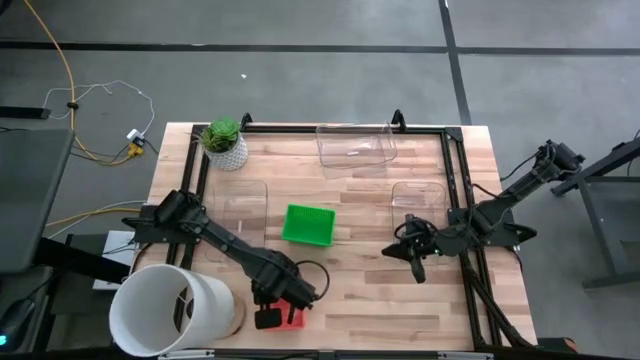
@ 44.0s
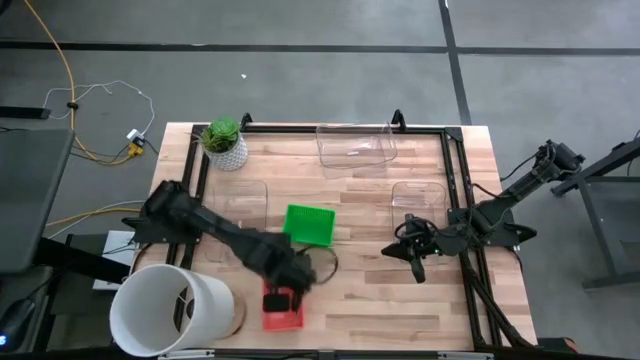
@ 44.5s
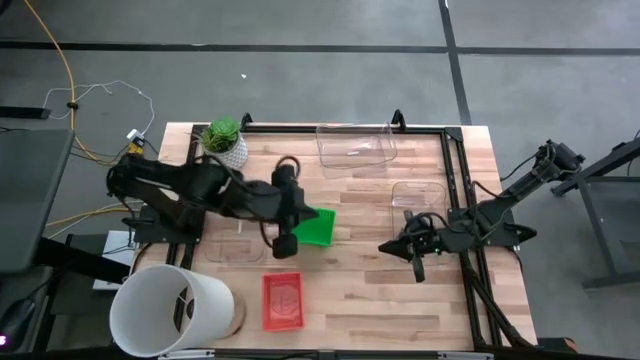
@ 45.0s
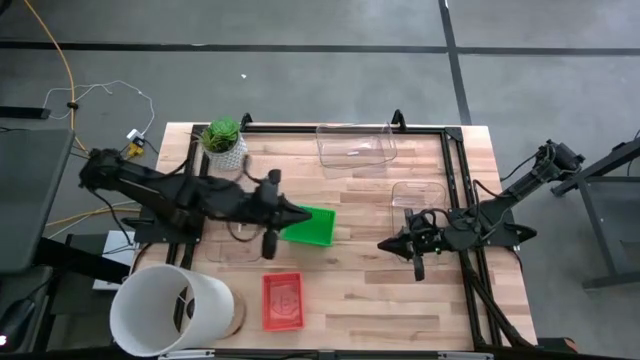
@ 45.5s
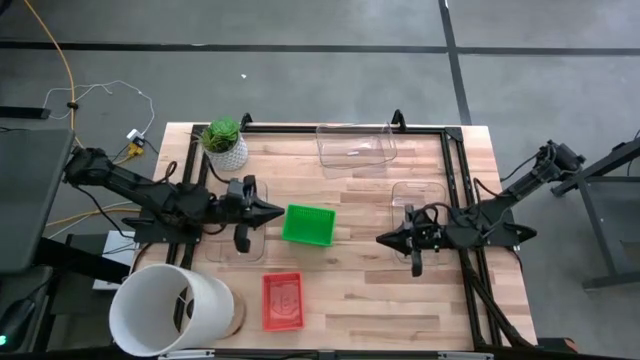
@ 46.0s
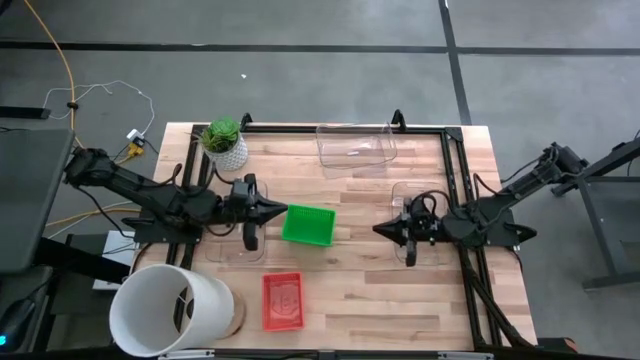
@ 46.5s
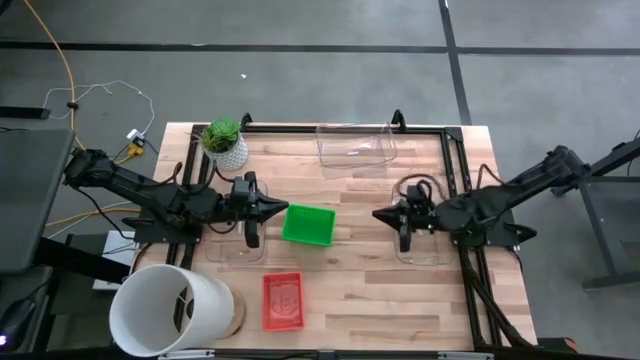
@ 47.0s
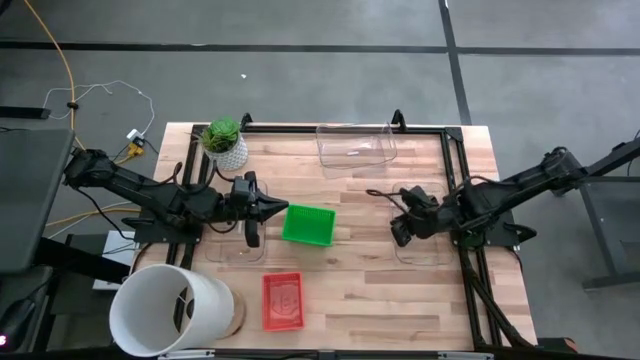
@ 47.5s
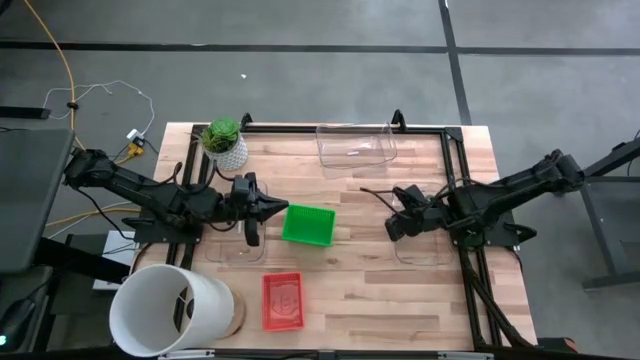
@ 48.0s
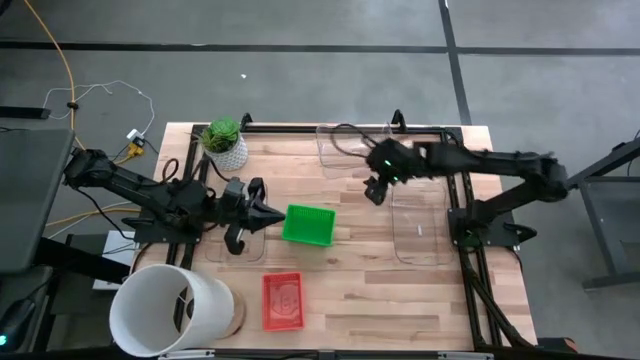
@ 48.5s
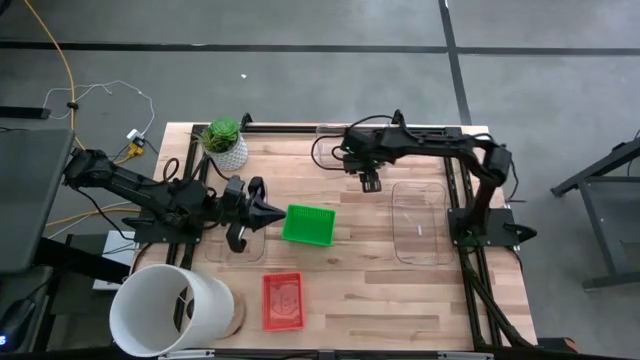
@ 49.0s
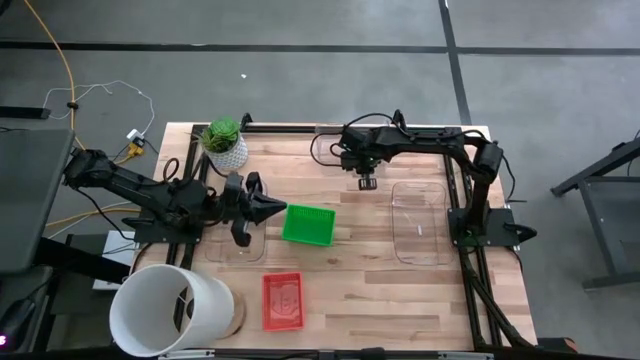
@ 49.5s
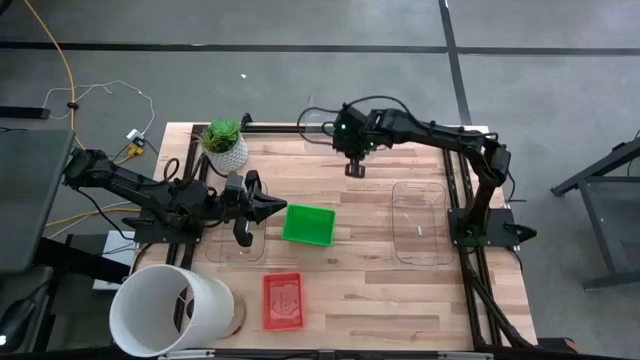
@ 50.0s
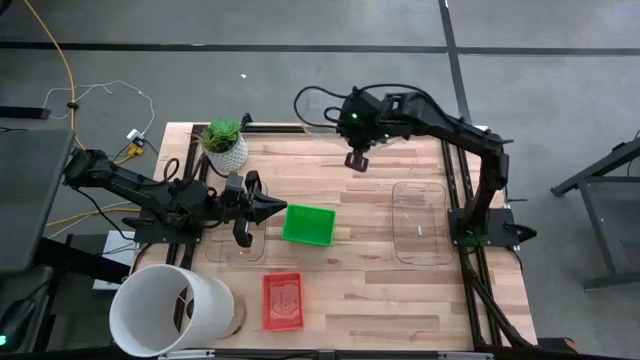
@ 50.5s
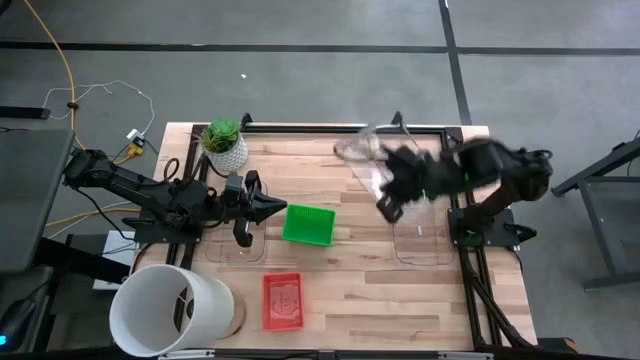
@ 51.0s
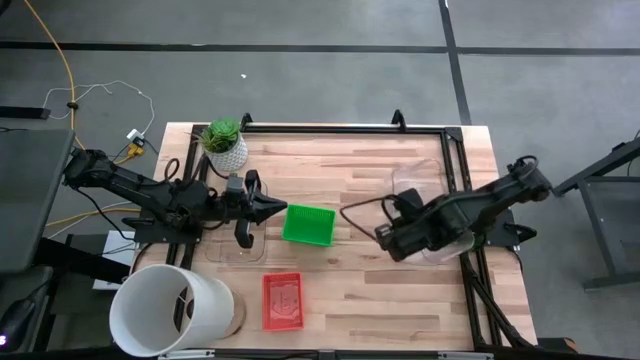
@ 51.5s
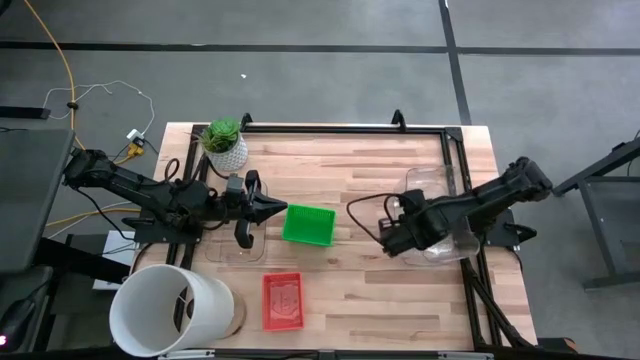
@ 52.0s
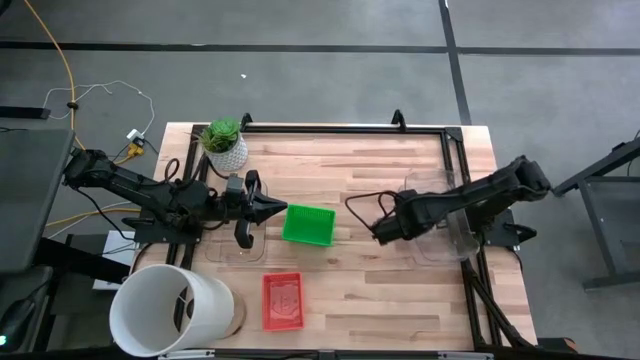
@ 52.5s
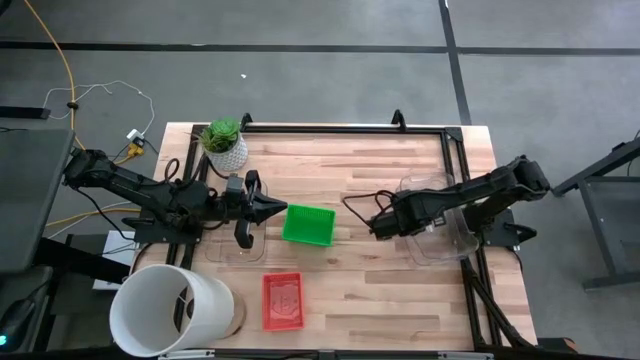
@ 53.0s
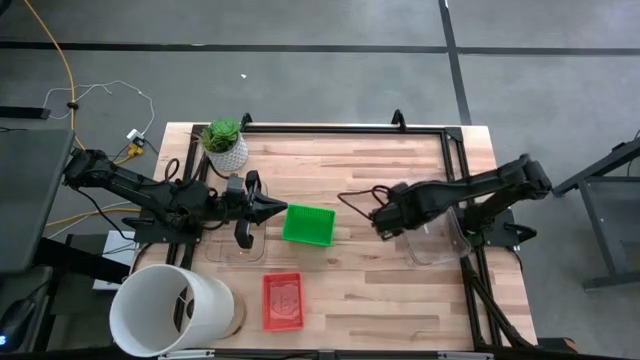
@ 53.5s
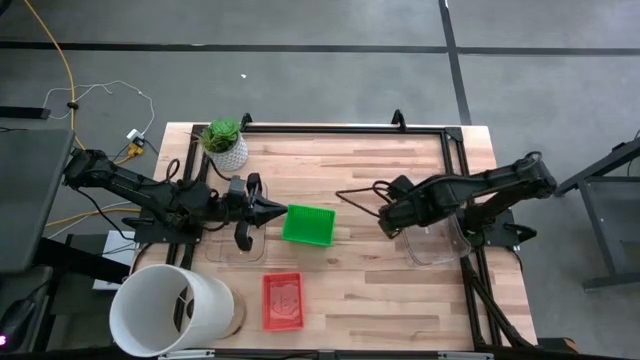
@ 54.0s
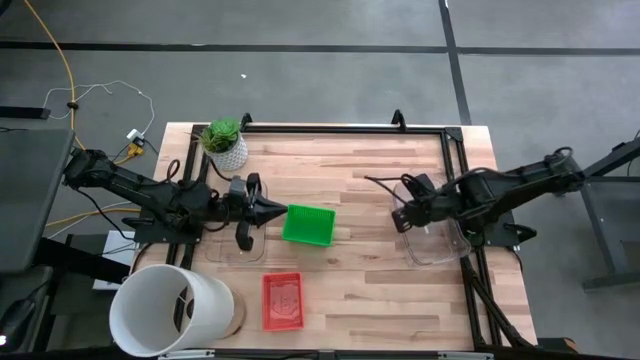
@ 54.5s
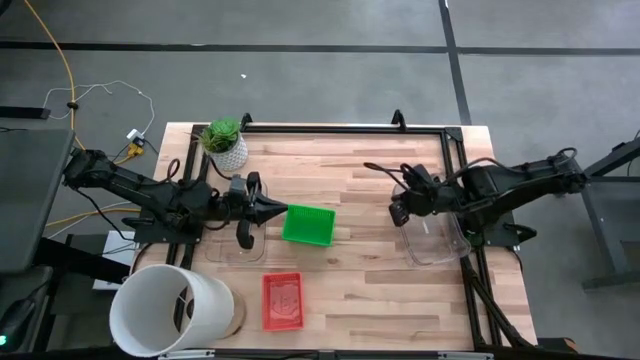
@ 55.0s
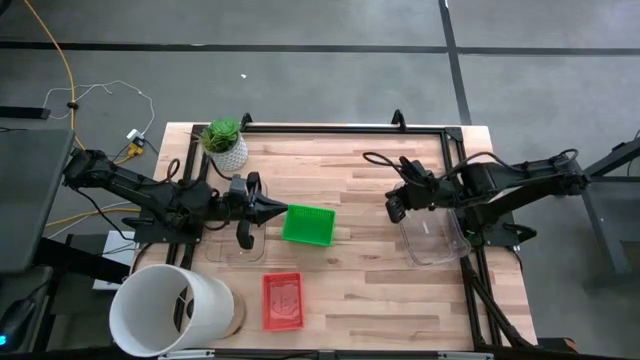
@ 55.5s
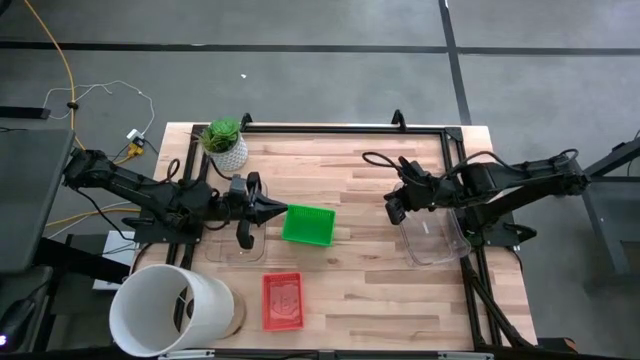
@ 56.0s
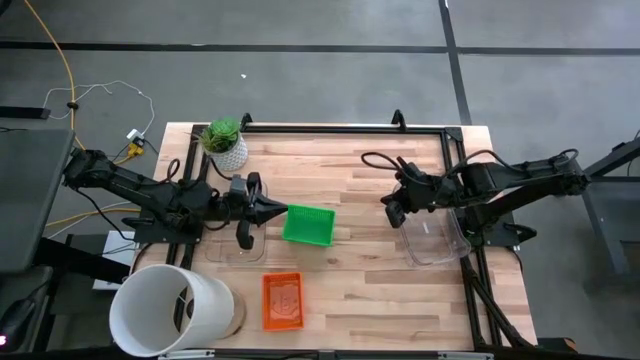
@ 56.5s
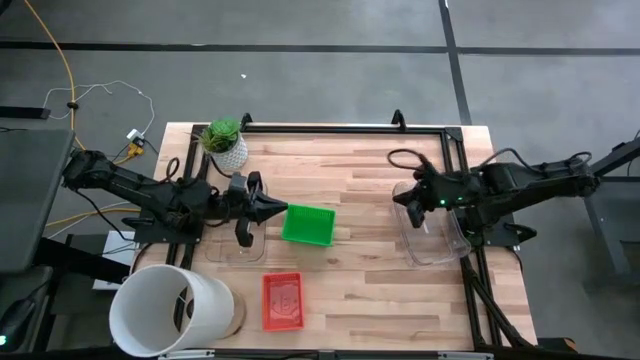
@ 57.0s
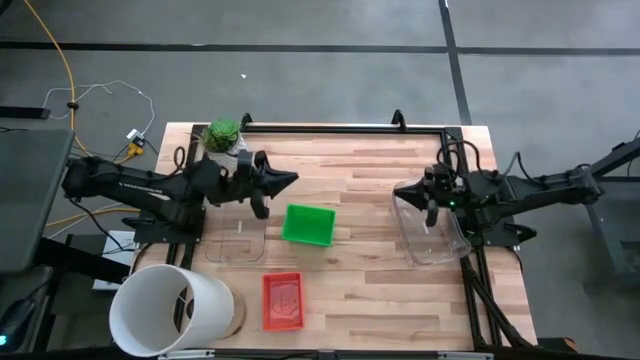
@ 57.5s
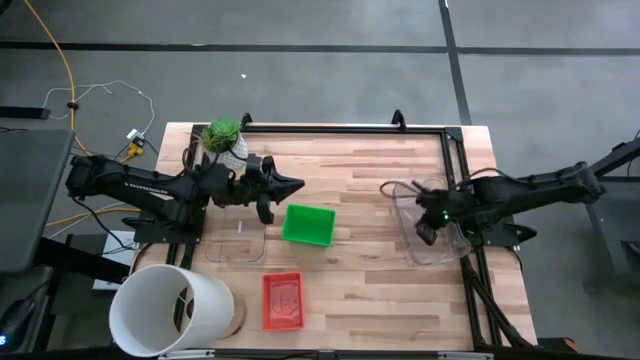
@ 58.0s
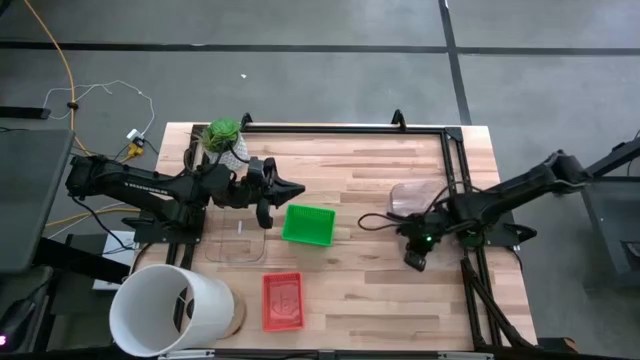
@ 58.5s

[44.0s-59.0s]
Stack the top center transparent bin on the right transparent bin
